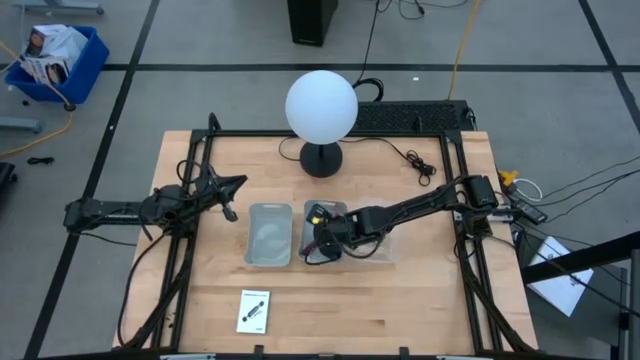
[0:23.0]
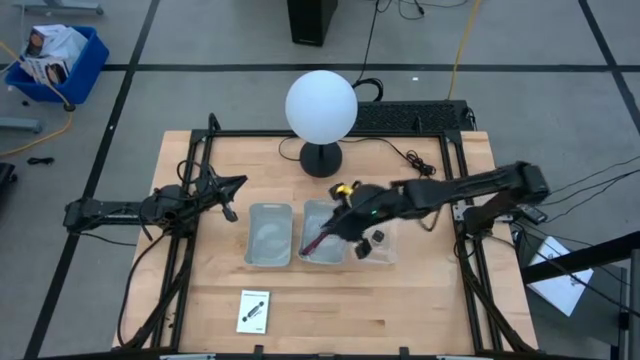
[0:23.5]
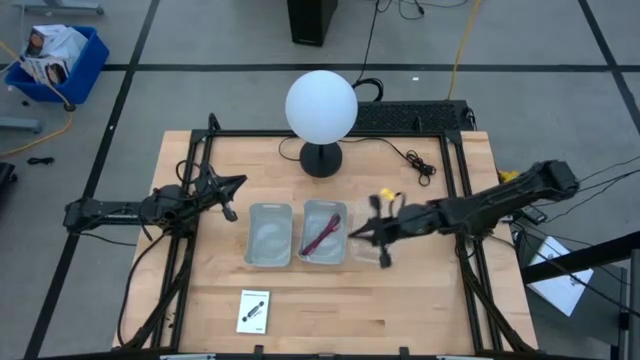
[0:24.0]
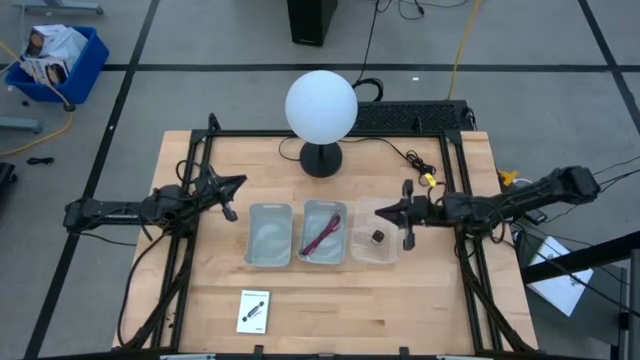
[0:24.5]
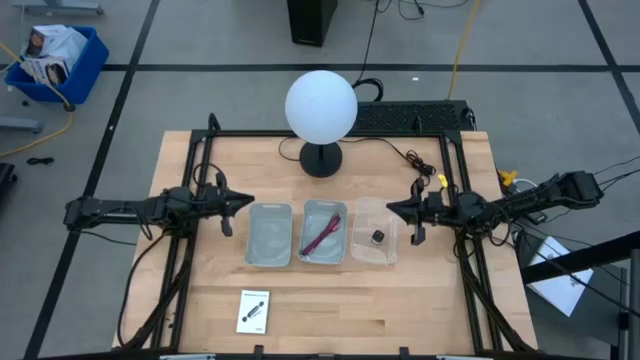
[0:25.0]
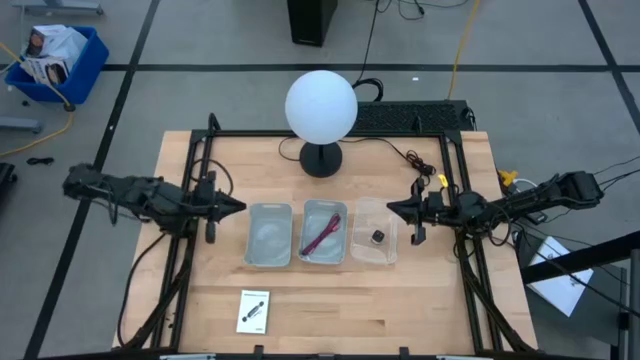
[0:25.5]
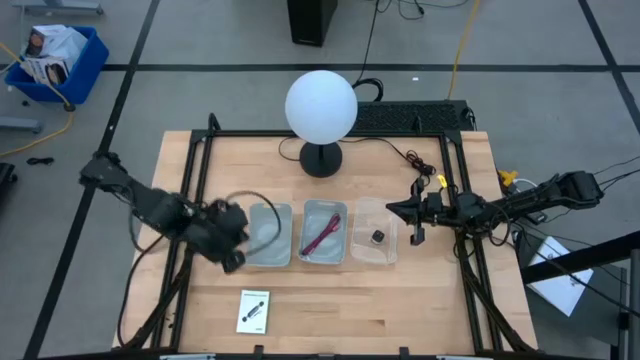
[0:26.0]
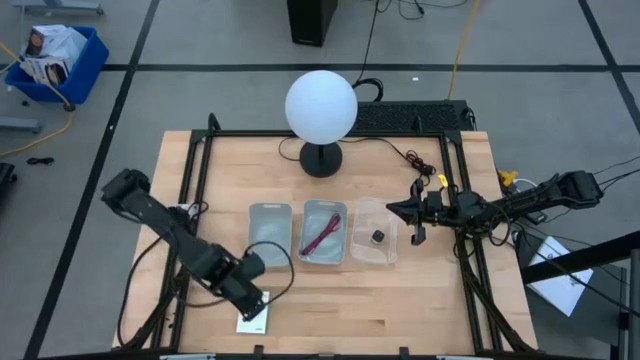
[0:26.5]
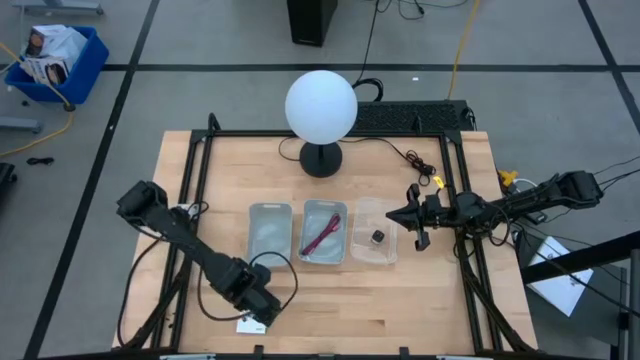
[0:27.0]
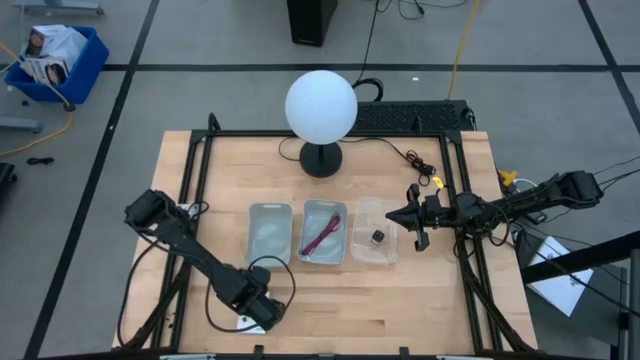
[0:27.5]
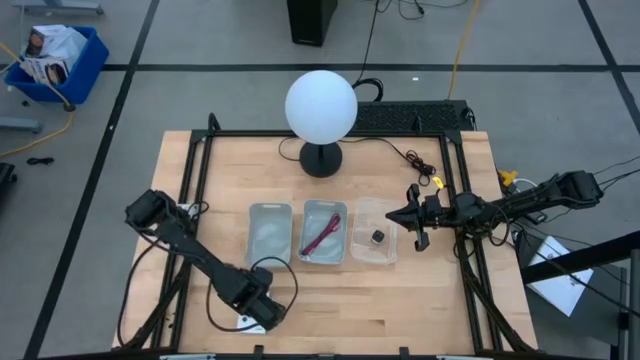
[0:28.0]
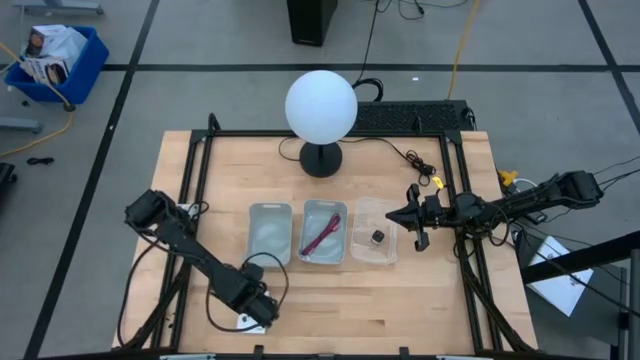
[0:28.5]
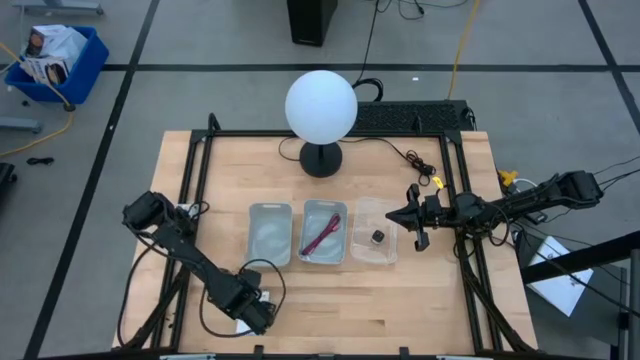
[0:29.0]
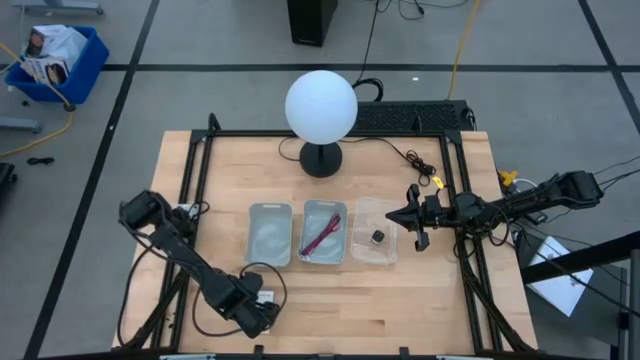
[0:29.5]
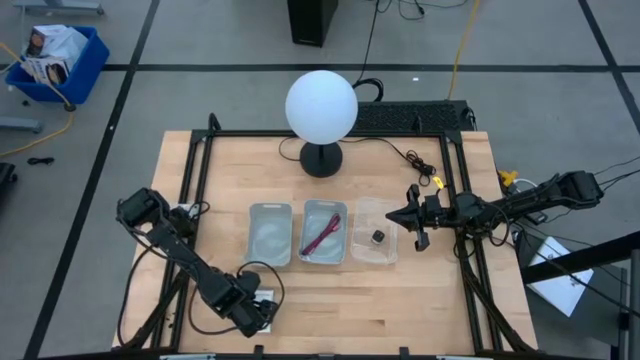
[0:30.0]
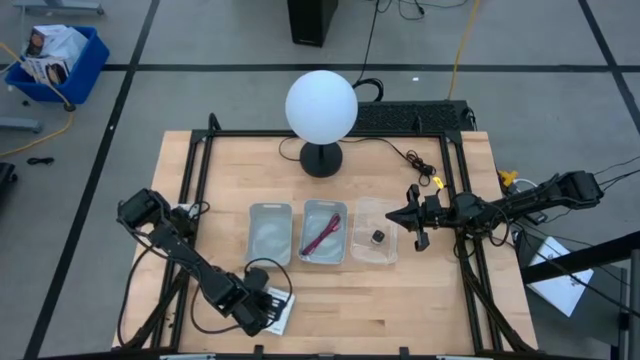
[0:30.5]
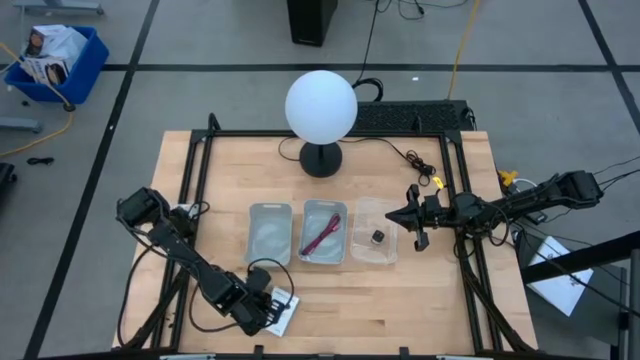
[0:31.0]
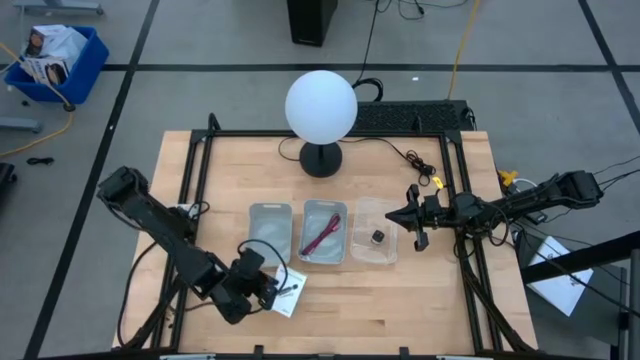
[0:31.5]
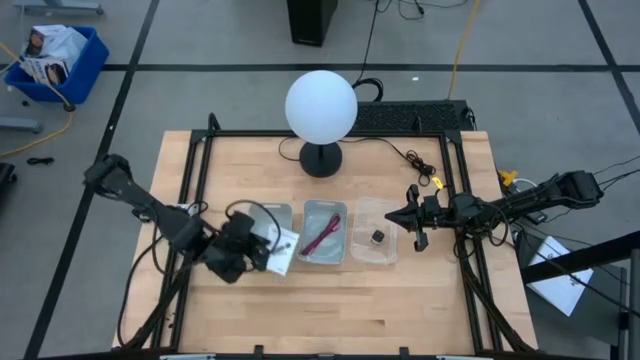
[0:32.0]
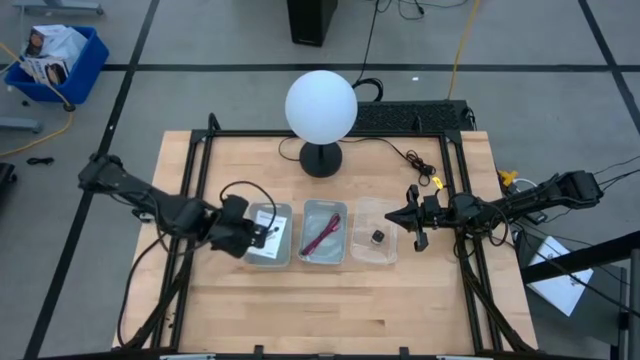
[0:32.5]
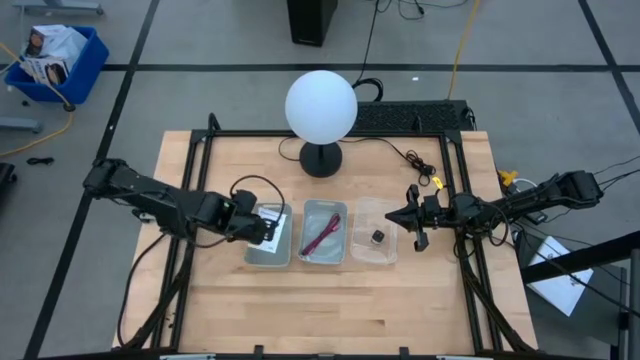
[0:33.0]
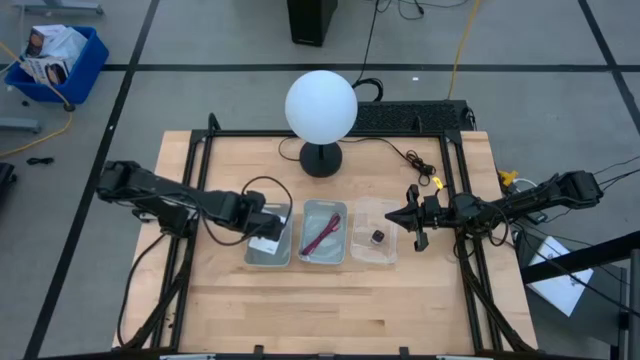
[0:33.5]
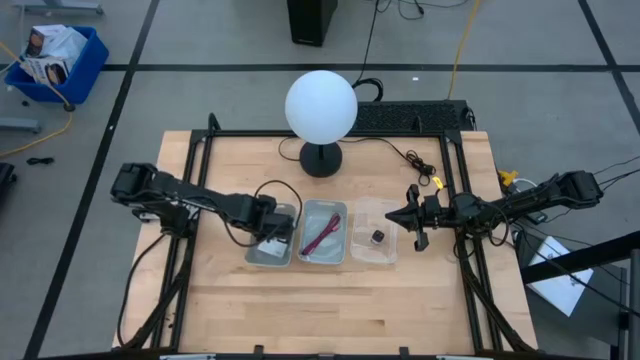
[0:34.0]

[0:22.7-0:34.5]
Task: Pick and place items into bin
Put the white card reader box into the left gray bin

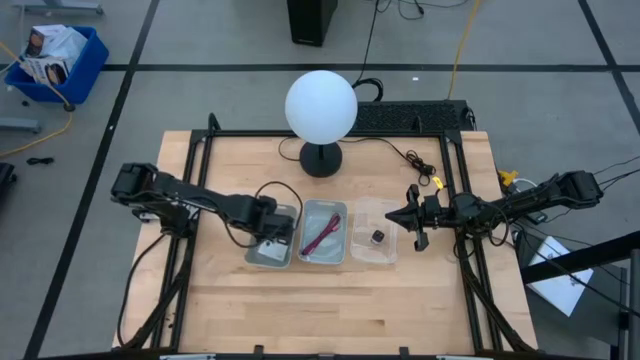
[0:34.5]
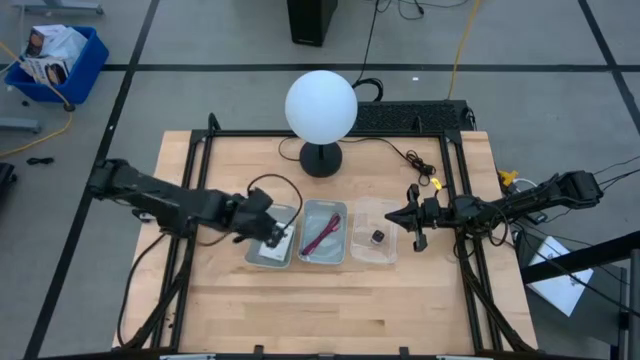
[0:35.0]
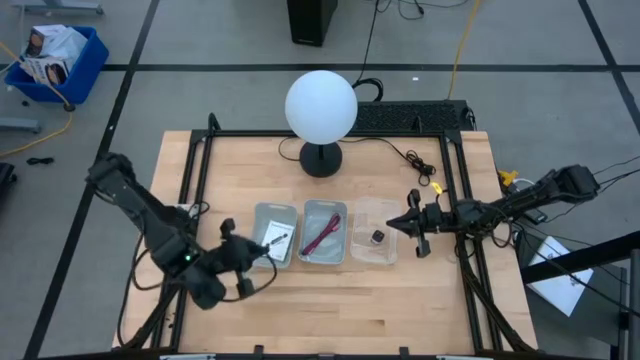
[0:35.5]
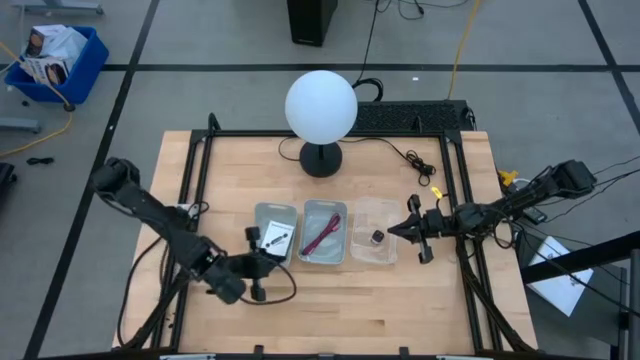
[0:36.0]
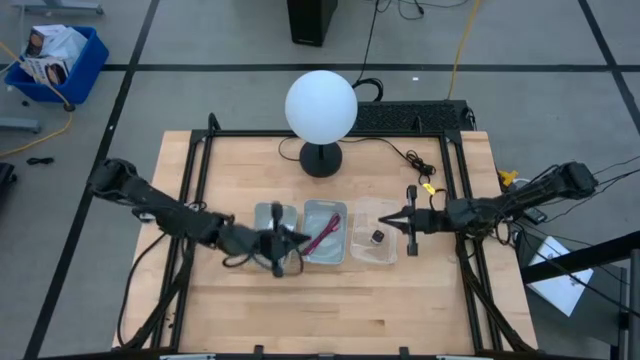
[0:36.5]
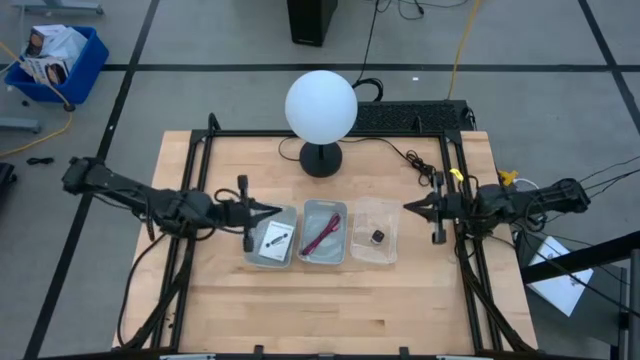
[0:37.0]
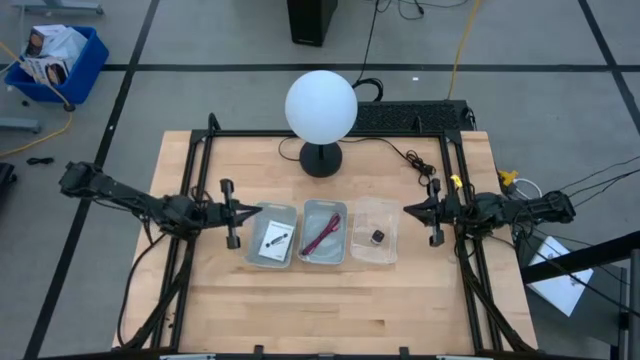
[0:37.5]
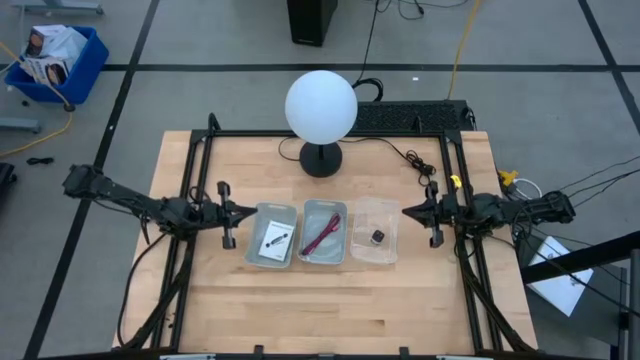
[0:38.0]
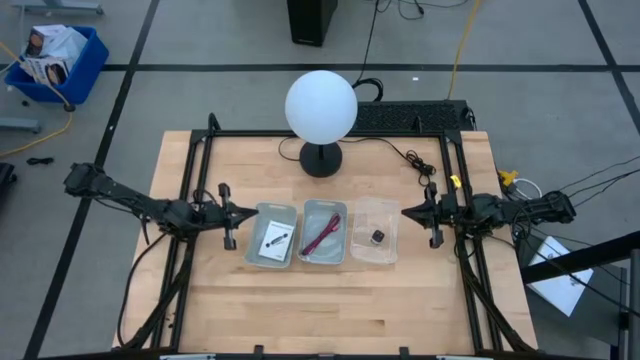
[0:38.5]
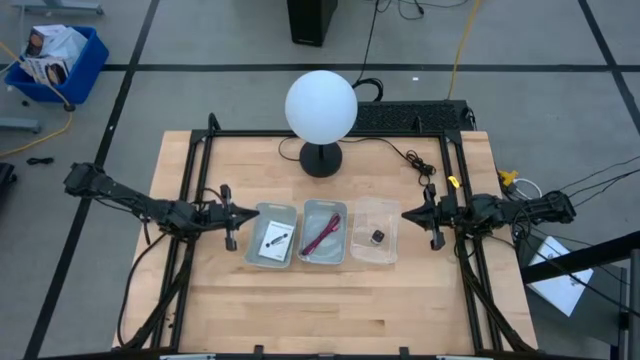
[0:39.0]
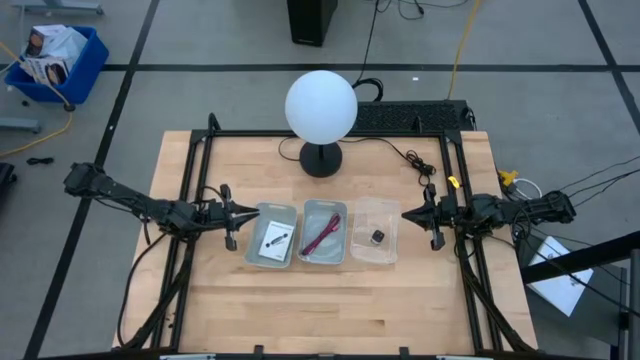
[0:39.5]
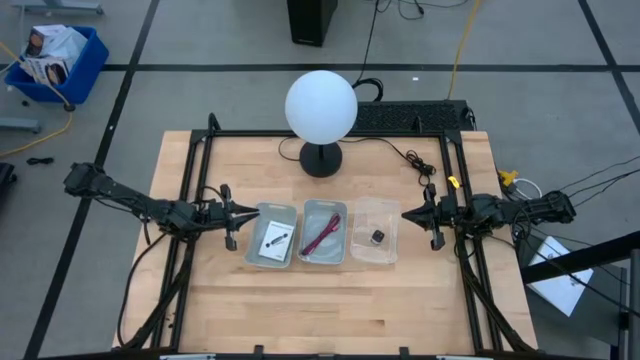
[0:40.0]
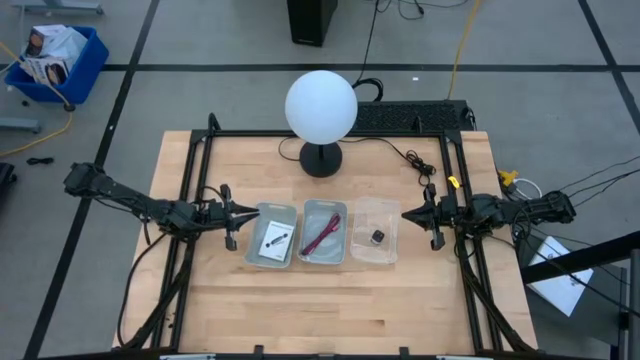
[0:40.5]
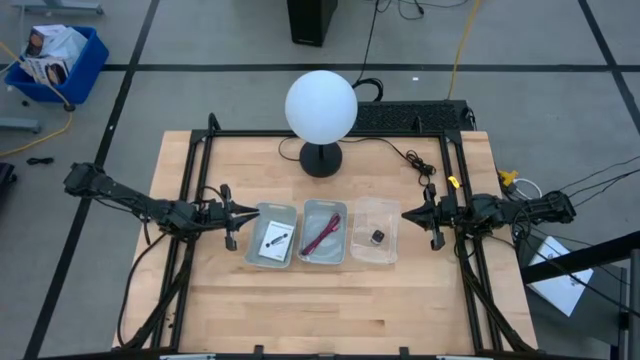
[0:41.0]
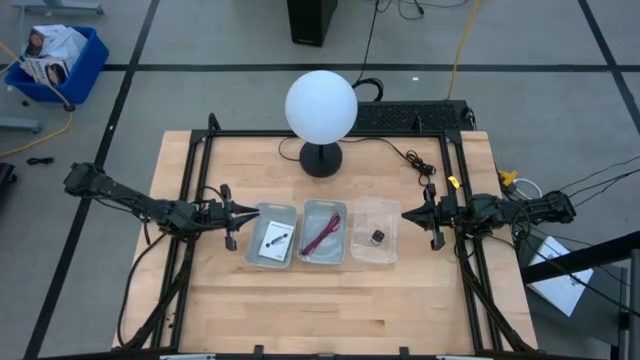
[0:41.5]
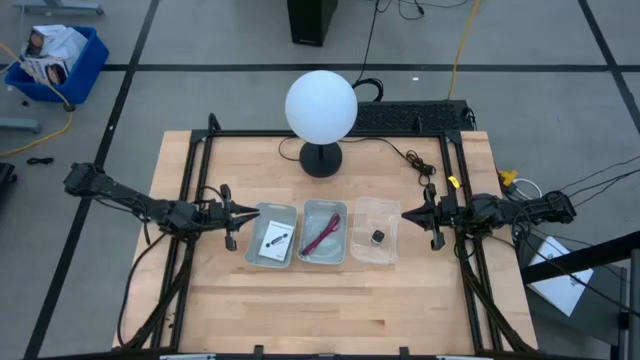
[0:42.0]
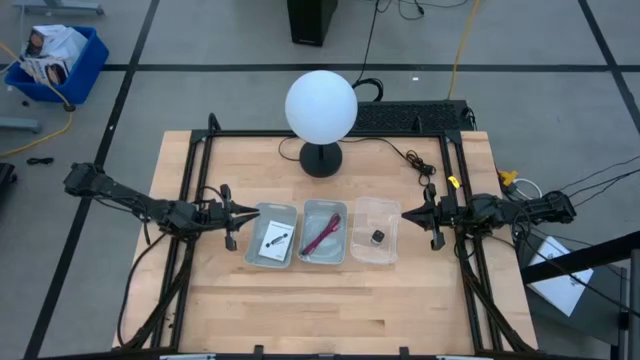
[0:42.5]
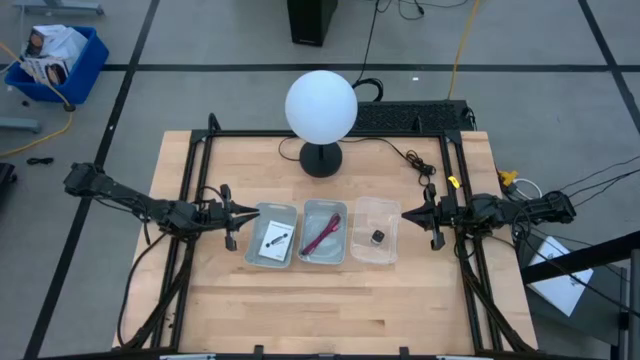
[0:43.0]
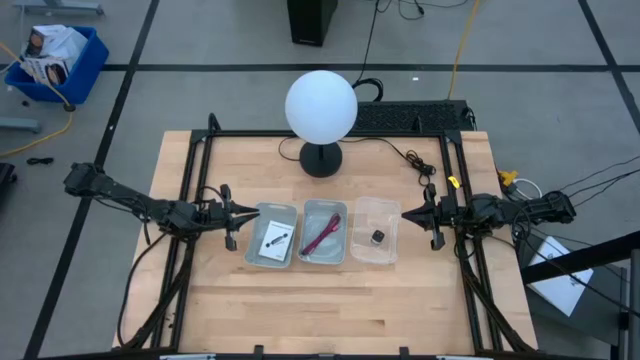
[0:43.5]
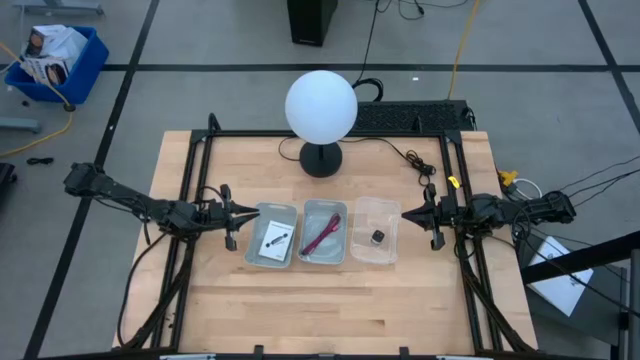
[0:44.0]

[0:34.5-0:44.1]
Return to Home Position
